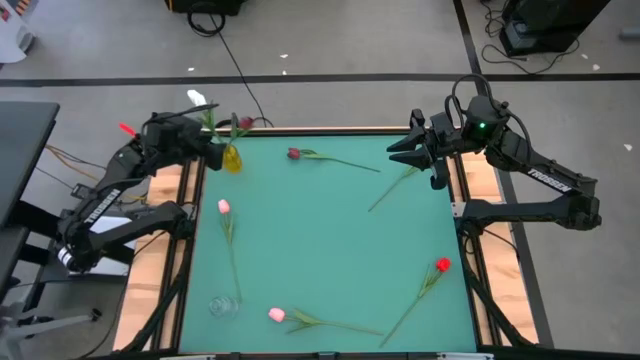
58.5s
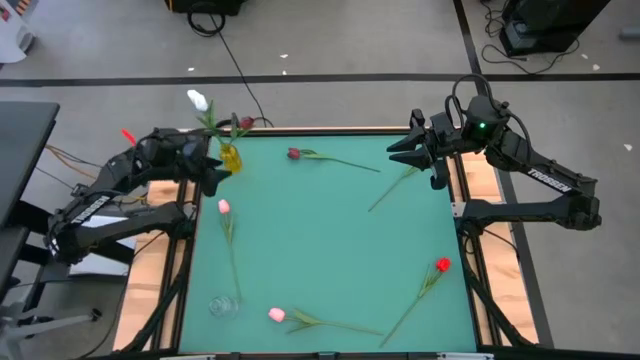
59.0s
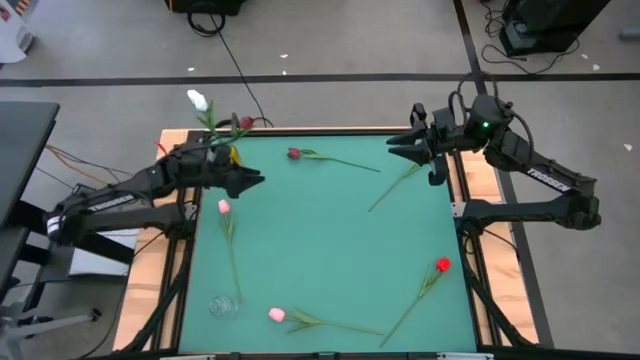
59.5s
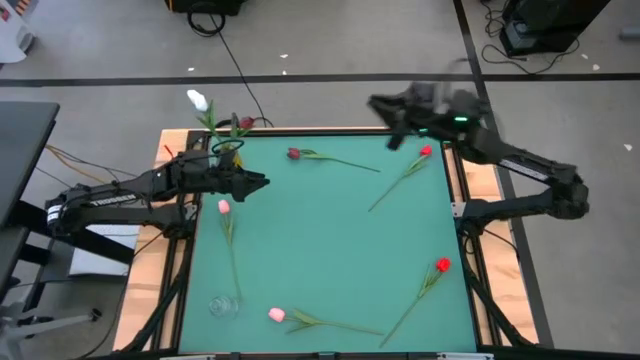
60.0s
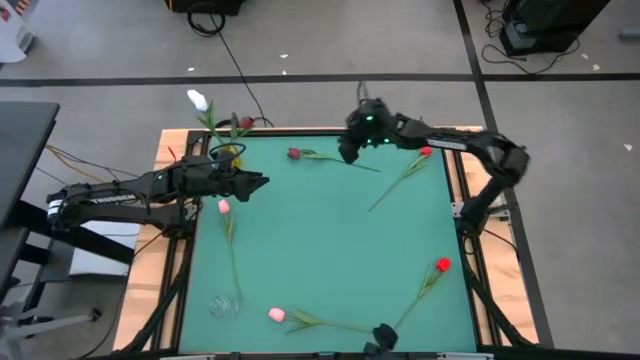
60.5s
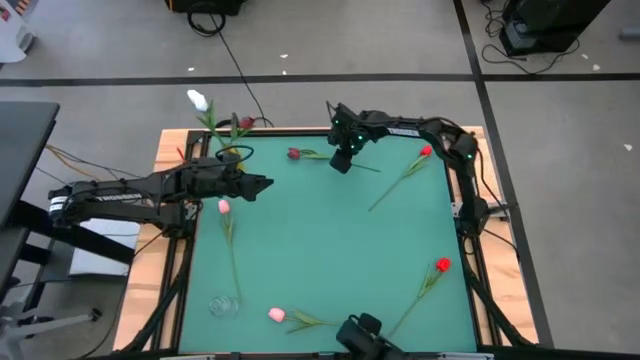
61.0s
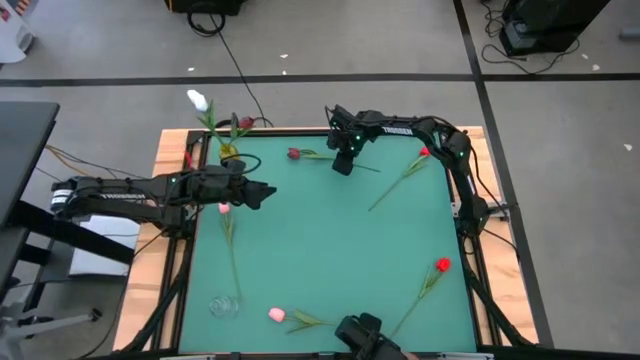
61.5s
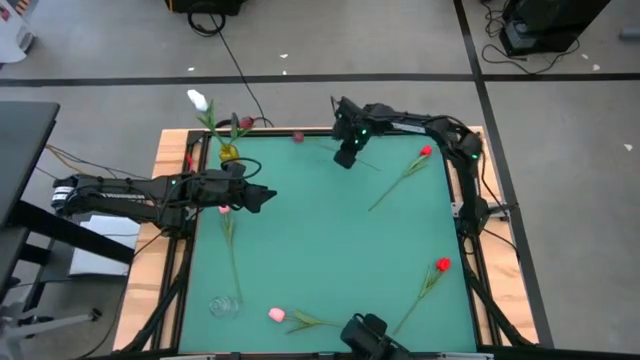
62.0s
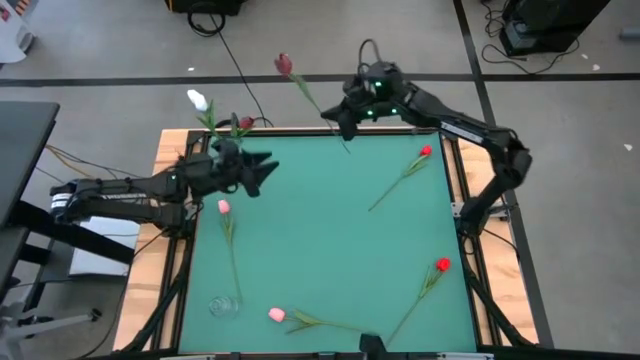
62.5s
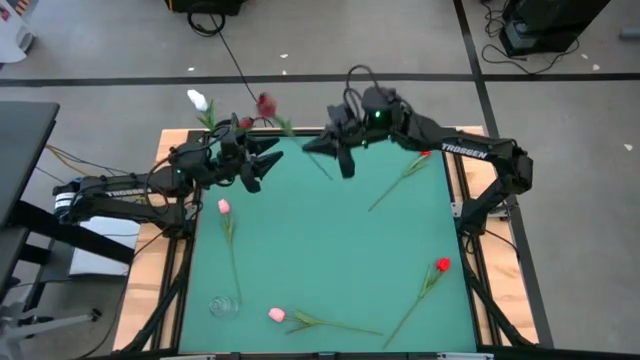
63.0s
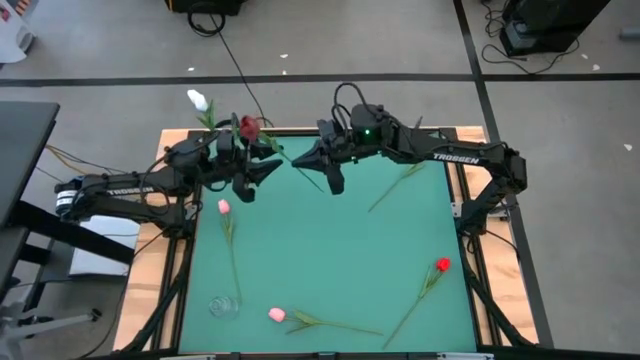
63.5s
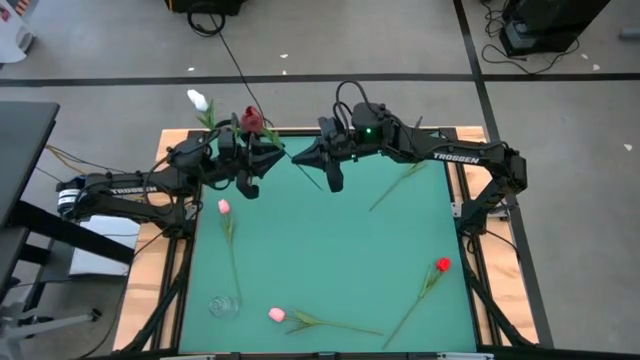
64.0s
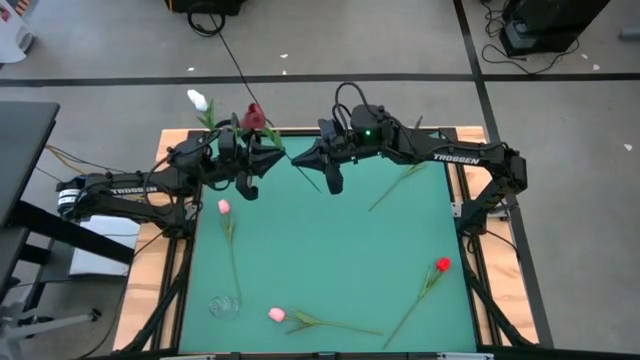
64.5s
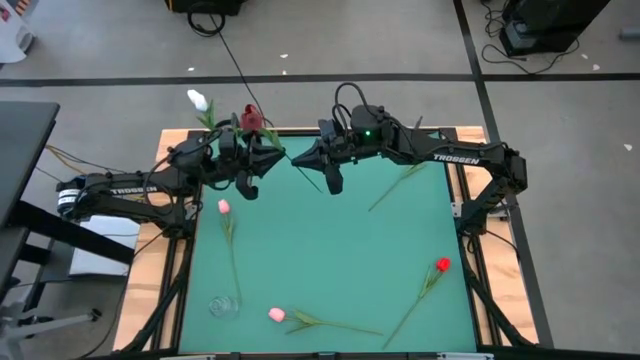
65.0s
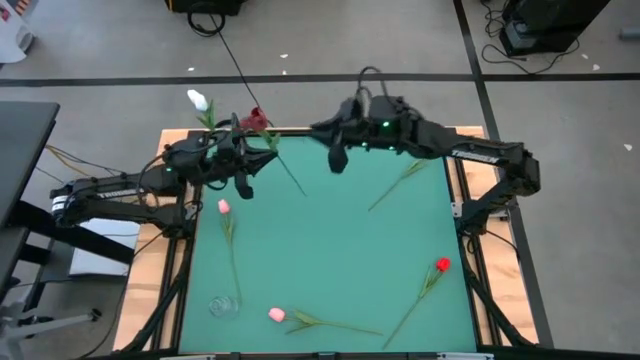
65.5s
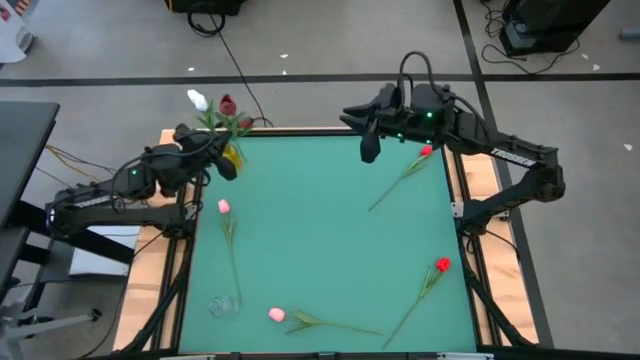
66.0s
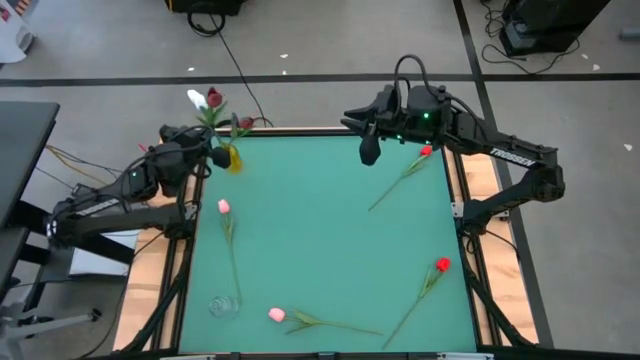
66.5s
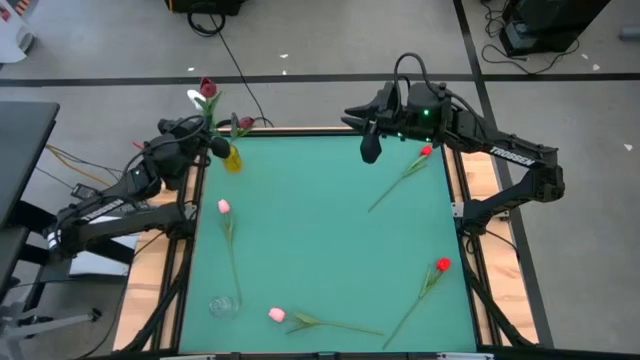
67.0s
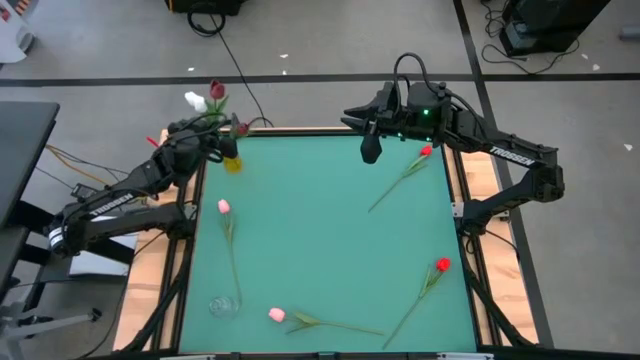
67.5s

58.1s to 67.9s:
Task: Sort flowers into vase by color
Put the dark red flower into the yellow vase

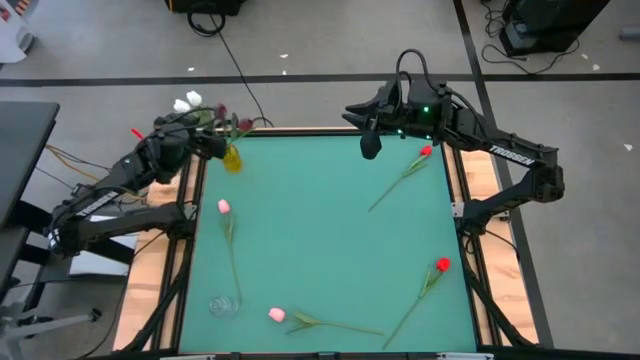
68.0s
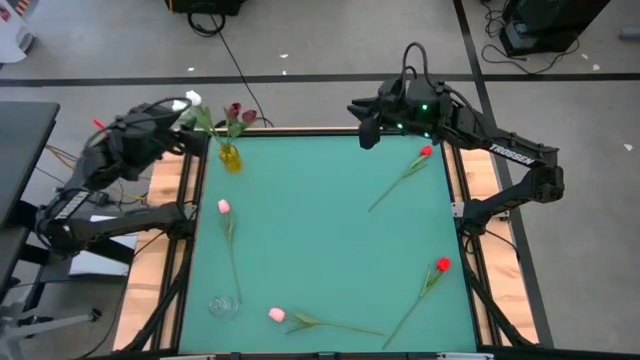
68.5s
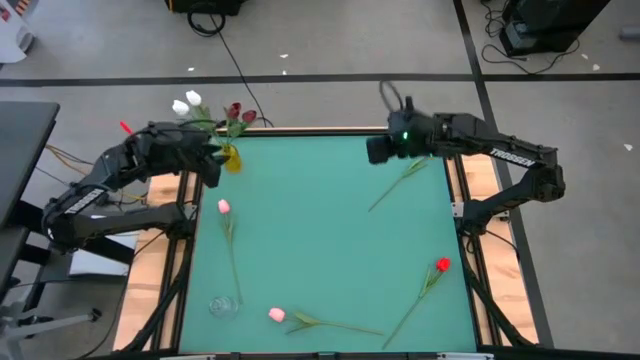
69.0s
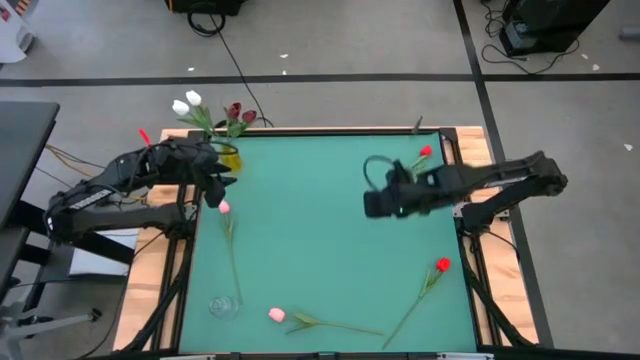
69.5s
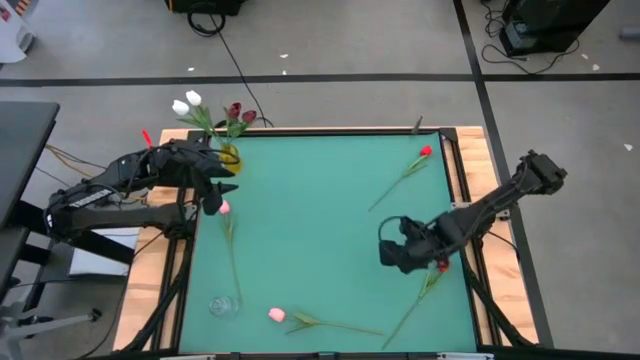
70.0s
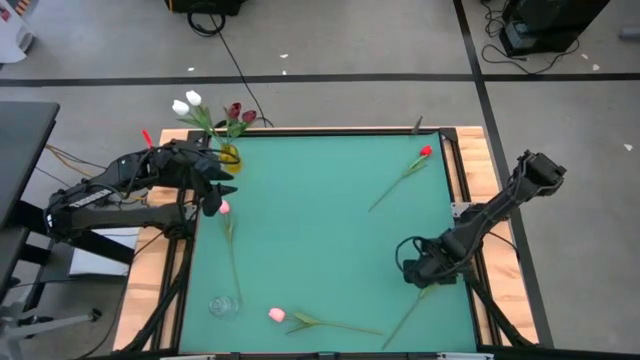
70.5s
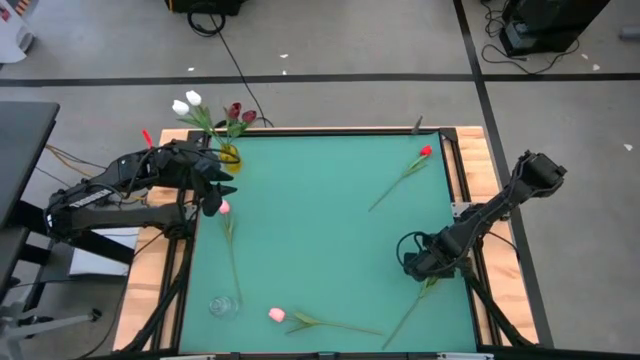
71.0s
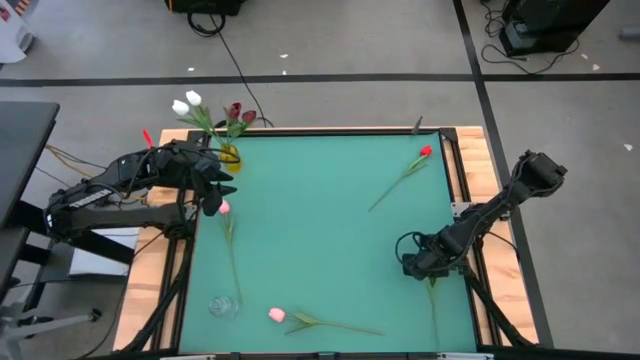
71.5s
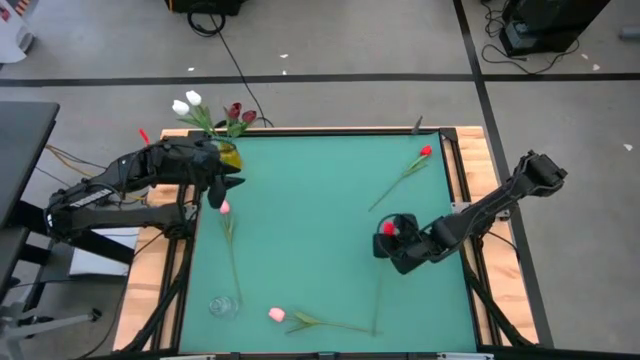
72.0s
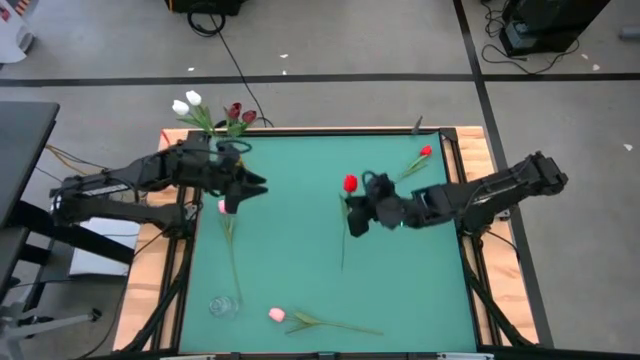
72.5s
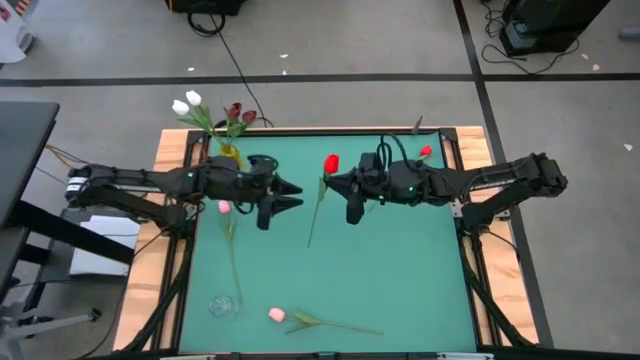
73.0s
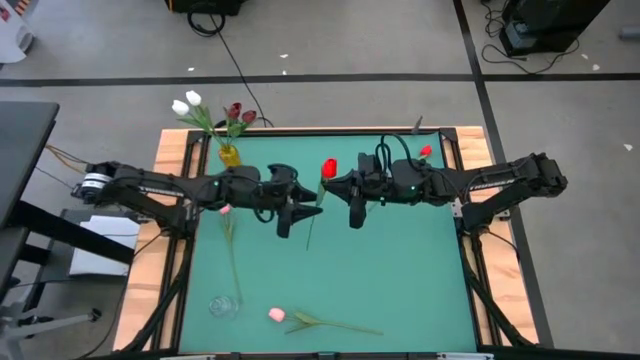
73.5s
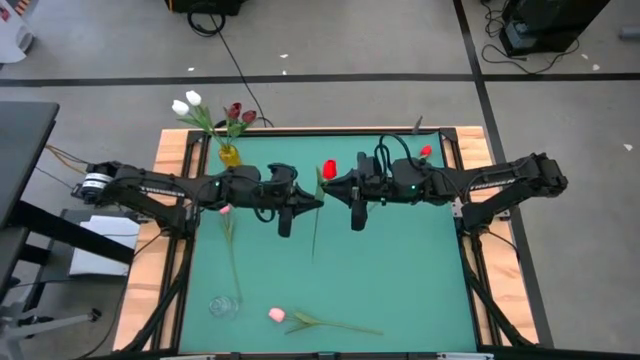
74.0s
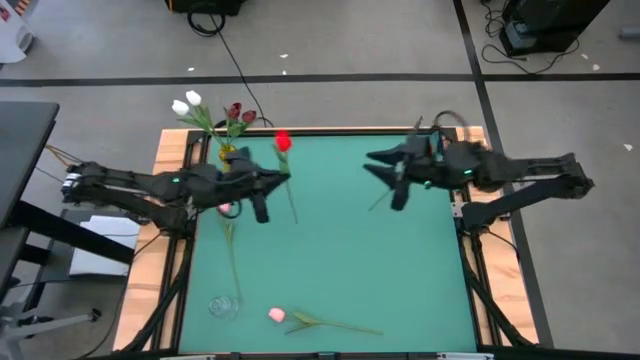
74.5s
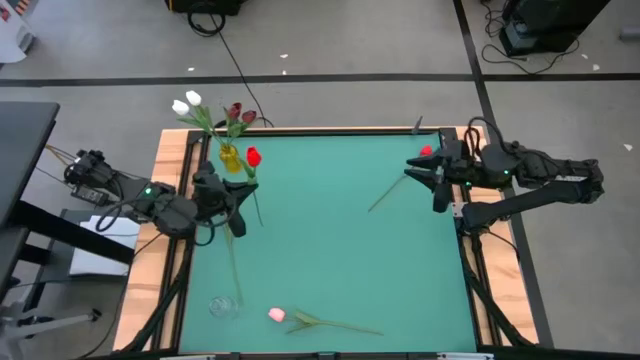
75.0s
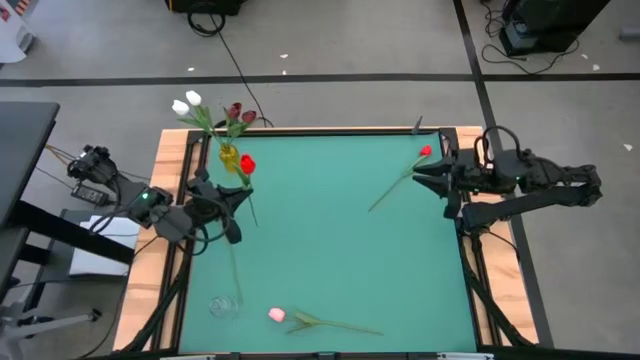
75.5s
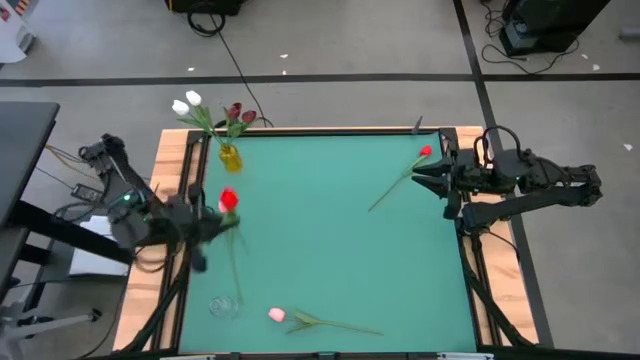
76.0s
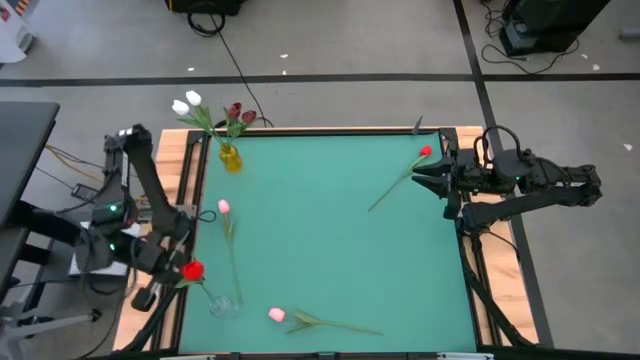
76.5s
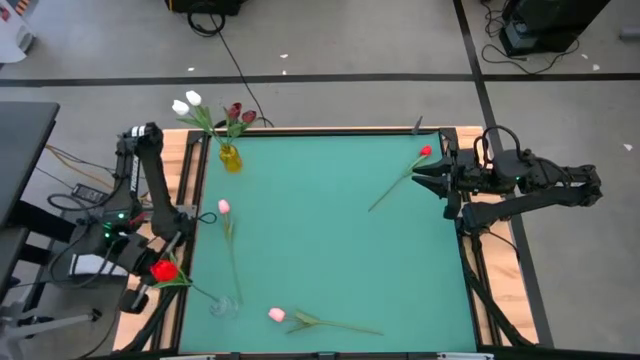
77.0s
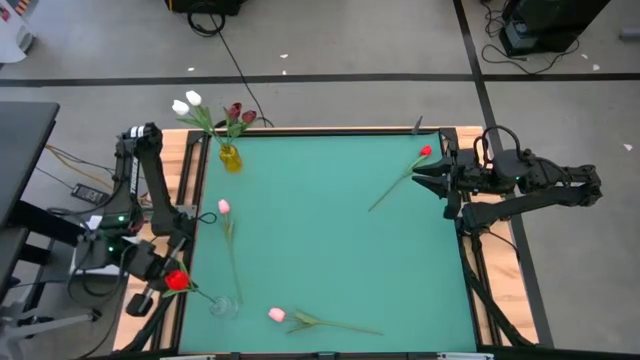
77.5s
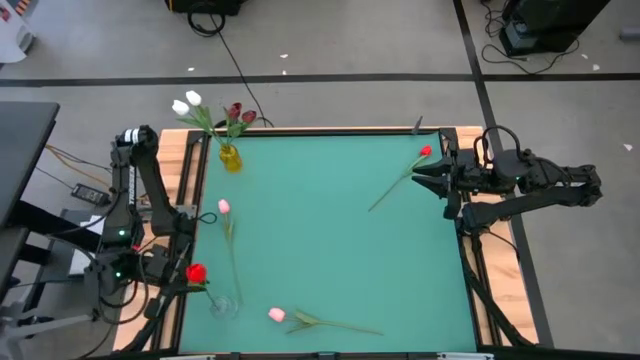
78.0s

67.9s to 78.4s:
Put the bottom red flower into the transparent vase

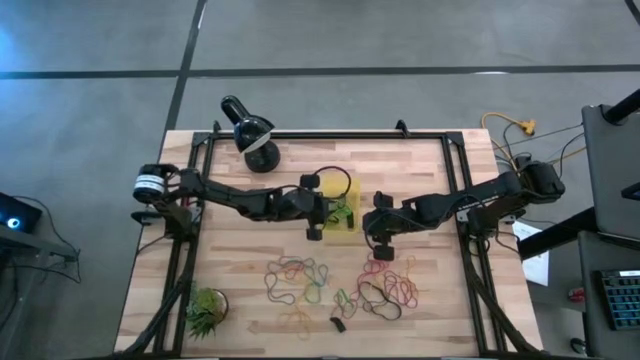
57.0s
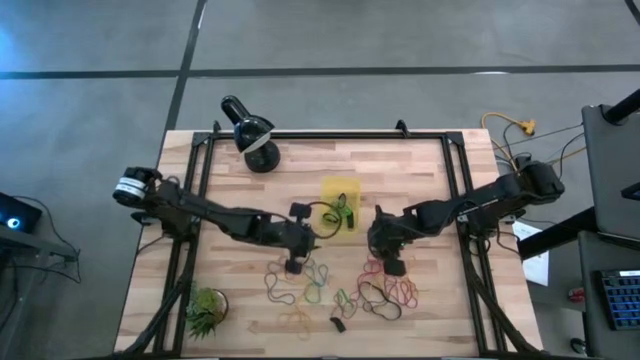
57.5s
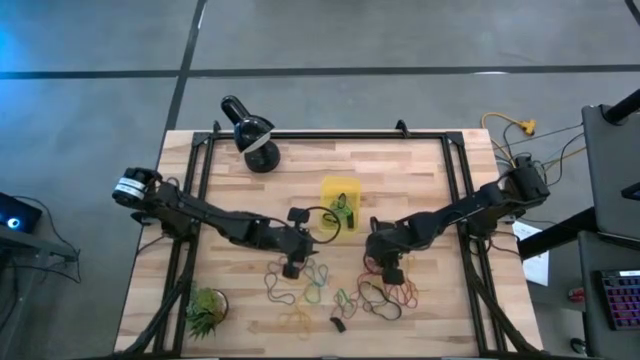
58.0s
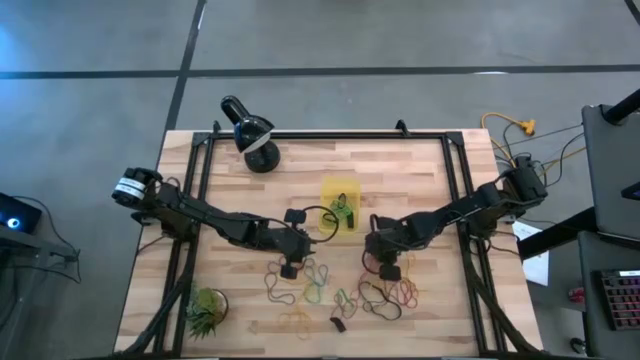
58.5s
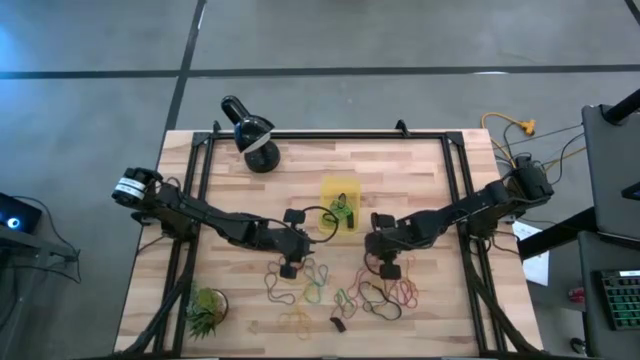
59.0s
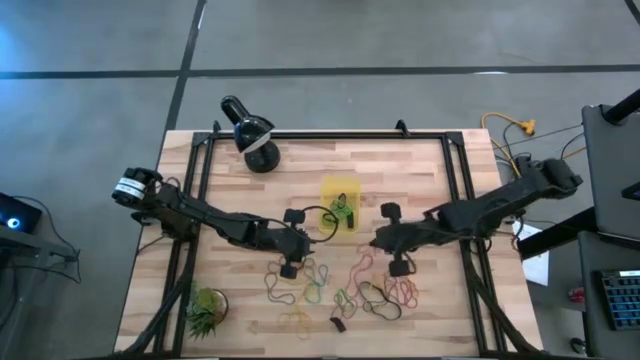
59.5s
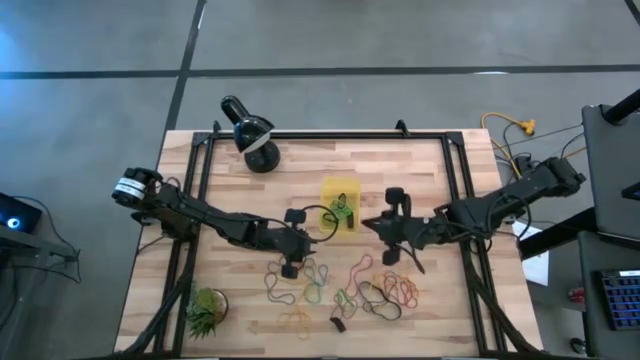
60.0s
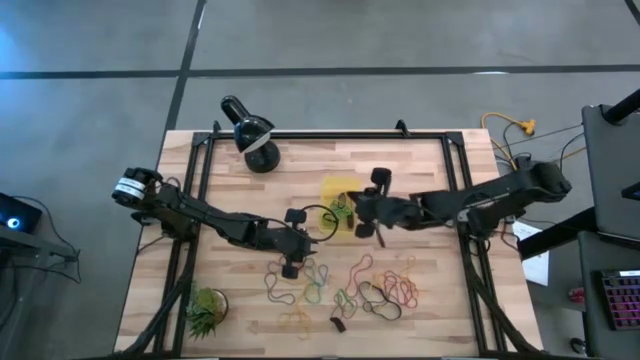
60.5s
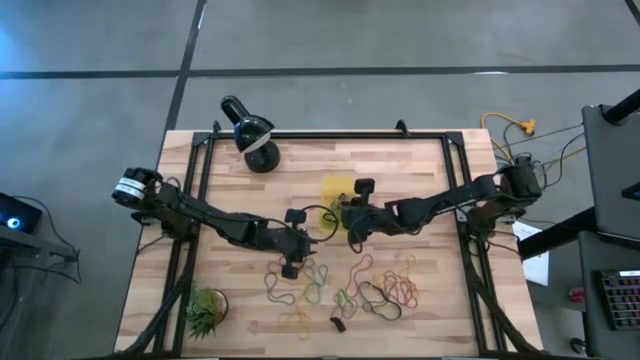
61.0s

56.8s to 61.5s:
Task: Pick and place rubber bands into bin
Put the red rubber band into the yellow bin
